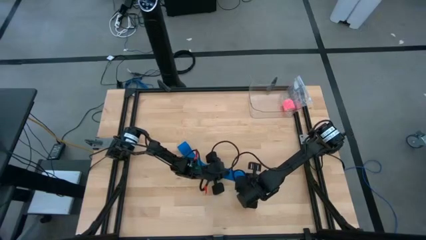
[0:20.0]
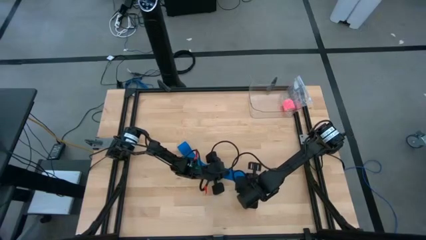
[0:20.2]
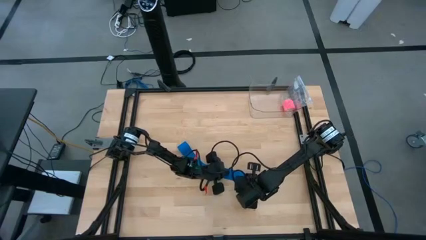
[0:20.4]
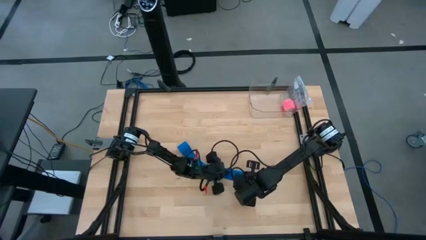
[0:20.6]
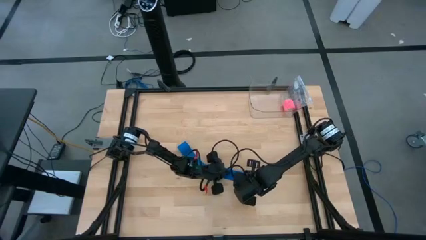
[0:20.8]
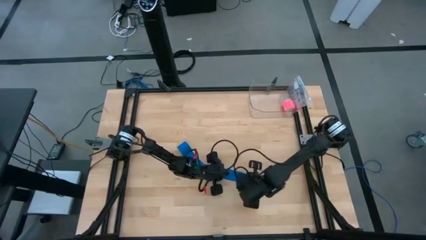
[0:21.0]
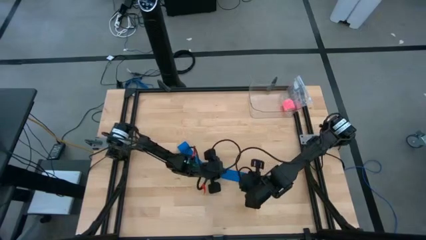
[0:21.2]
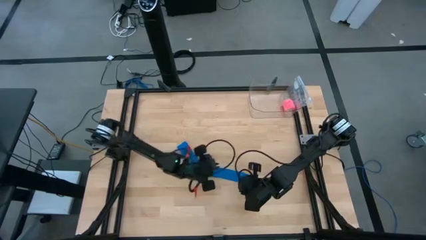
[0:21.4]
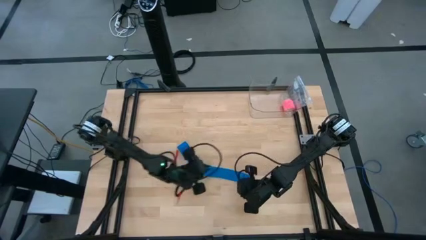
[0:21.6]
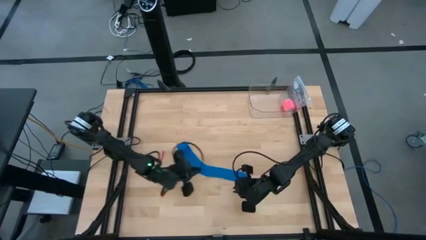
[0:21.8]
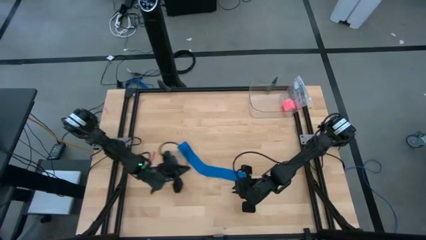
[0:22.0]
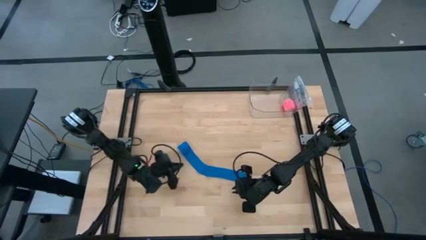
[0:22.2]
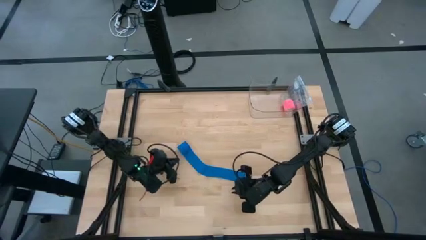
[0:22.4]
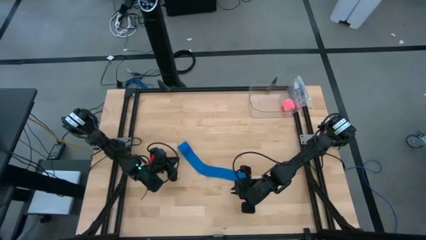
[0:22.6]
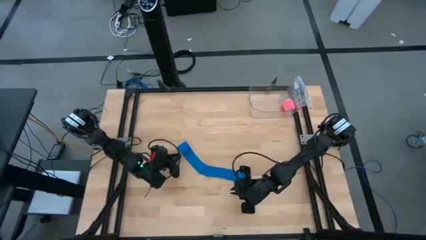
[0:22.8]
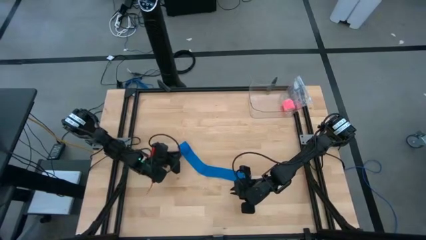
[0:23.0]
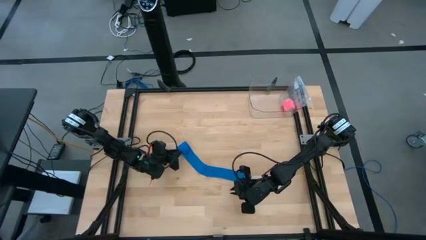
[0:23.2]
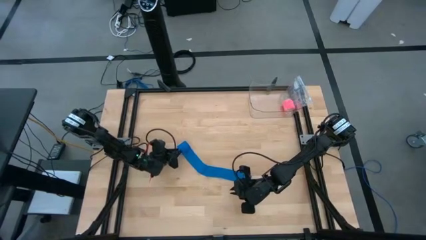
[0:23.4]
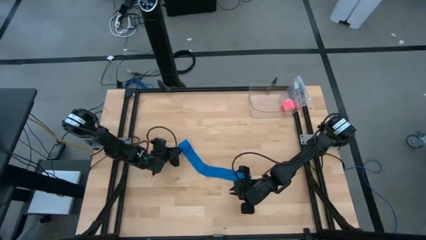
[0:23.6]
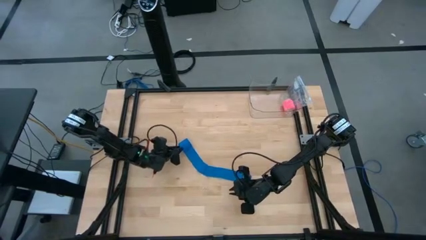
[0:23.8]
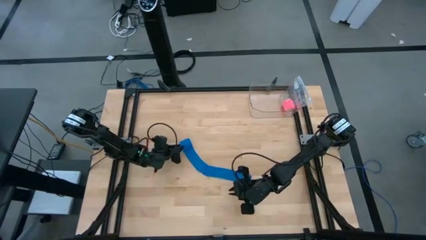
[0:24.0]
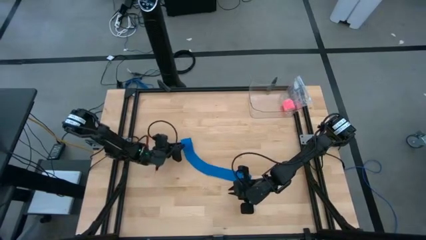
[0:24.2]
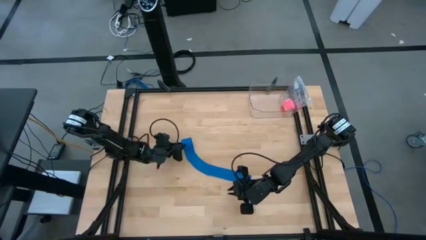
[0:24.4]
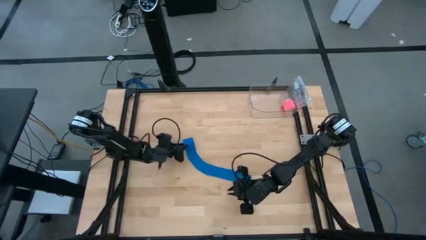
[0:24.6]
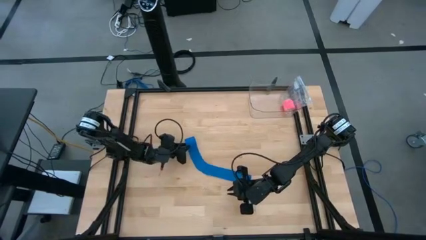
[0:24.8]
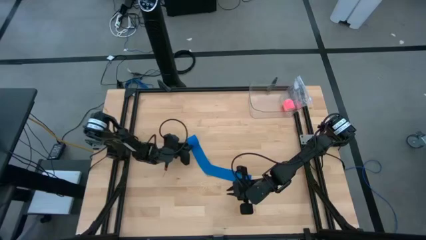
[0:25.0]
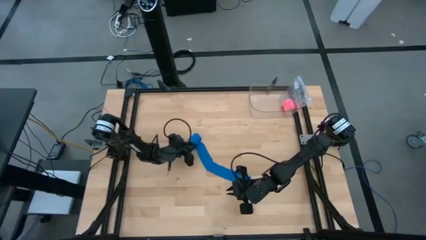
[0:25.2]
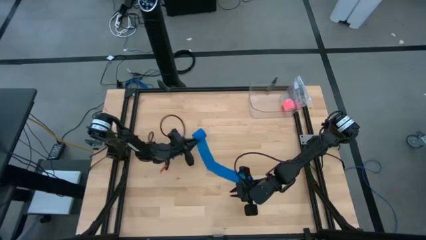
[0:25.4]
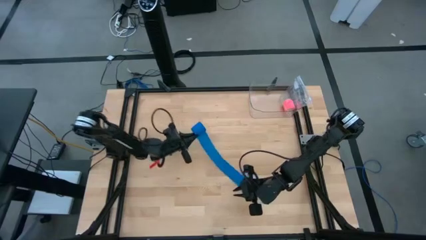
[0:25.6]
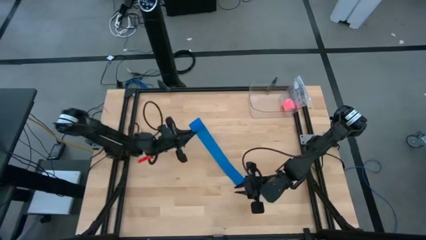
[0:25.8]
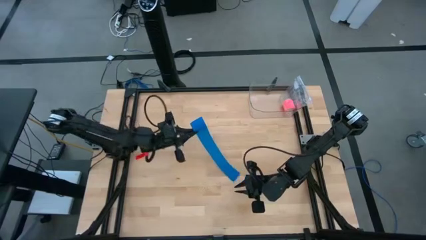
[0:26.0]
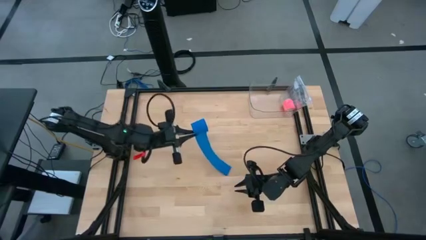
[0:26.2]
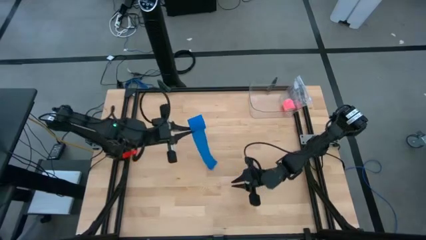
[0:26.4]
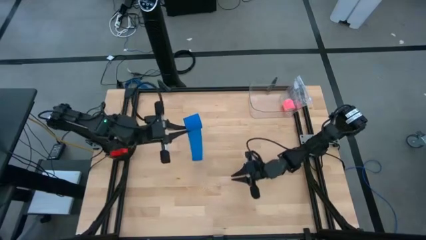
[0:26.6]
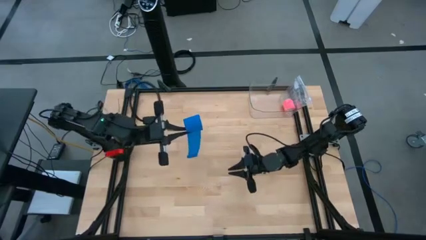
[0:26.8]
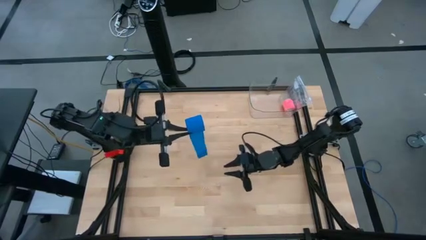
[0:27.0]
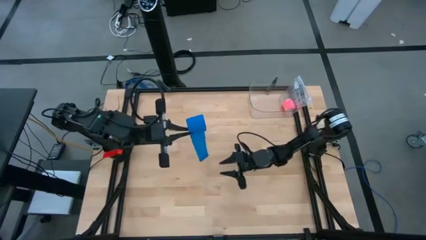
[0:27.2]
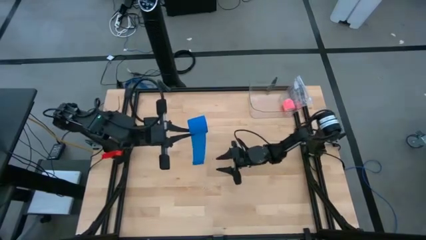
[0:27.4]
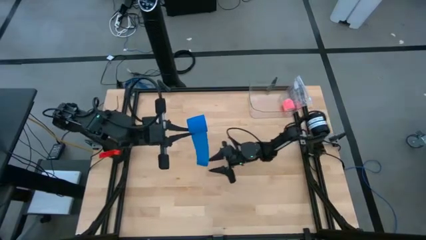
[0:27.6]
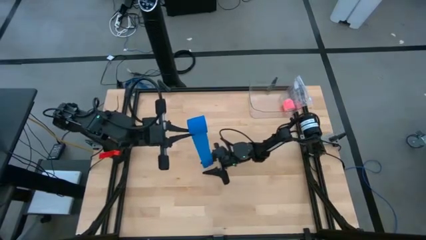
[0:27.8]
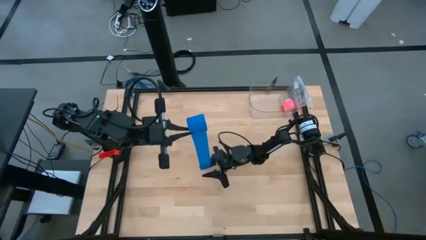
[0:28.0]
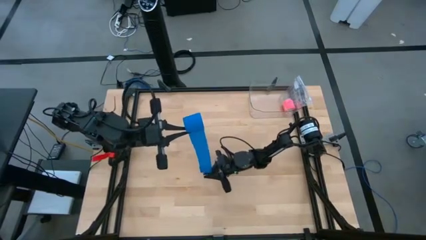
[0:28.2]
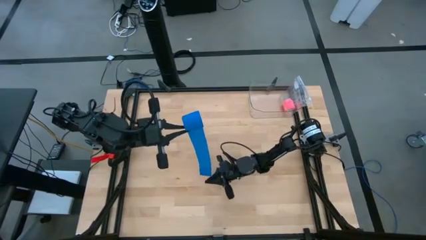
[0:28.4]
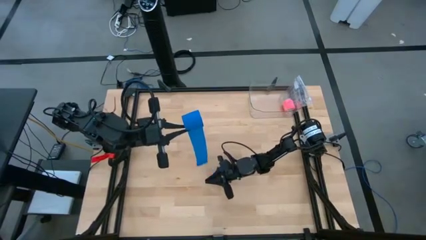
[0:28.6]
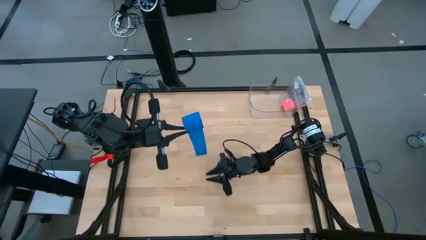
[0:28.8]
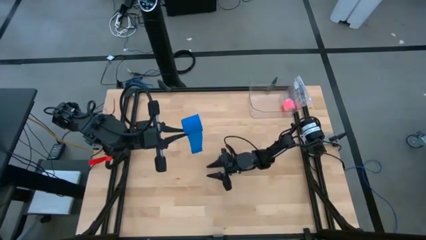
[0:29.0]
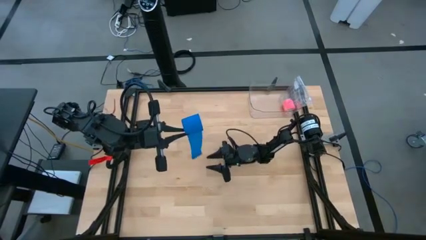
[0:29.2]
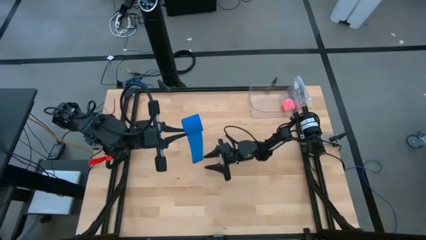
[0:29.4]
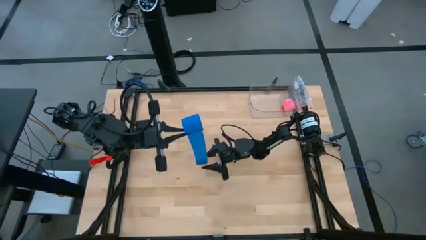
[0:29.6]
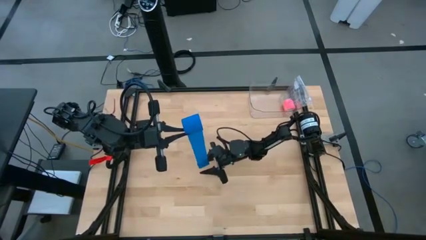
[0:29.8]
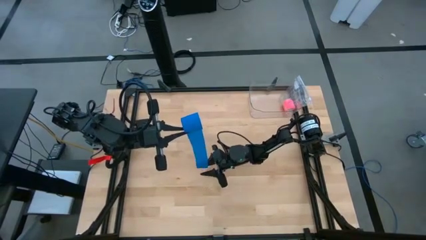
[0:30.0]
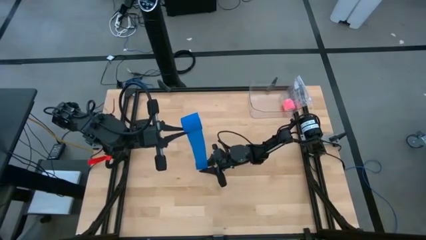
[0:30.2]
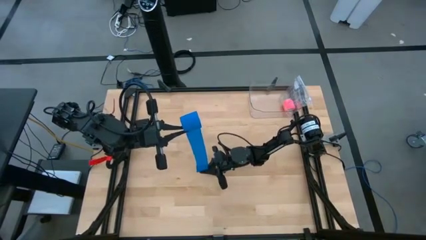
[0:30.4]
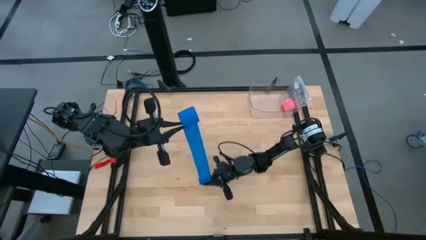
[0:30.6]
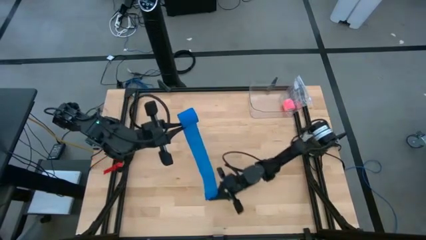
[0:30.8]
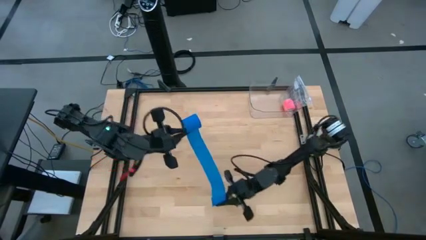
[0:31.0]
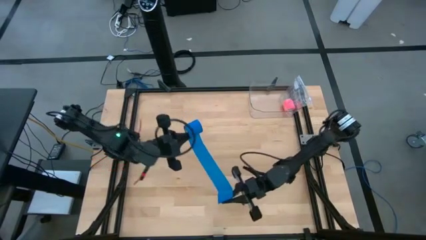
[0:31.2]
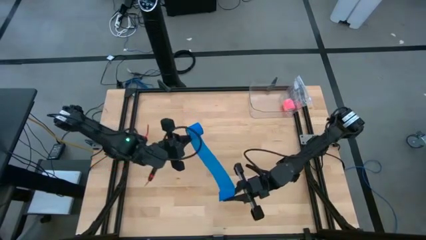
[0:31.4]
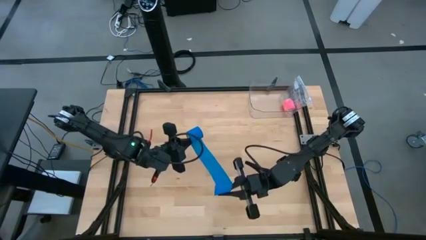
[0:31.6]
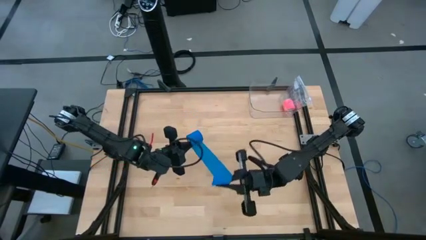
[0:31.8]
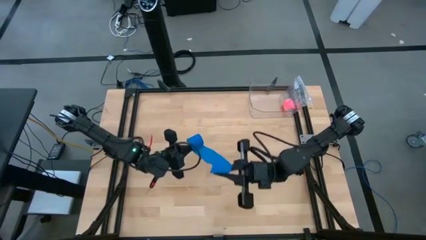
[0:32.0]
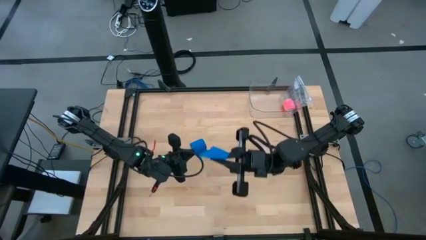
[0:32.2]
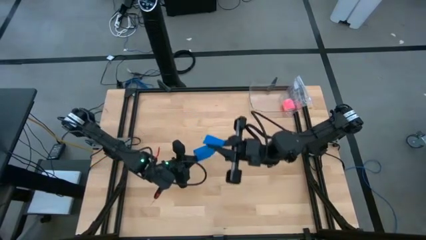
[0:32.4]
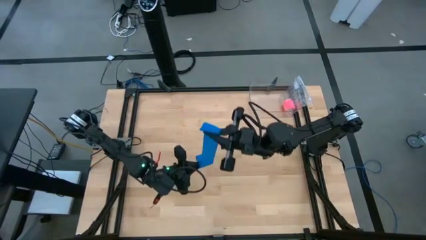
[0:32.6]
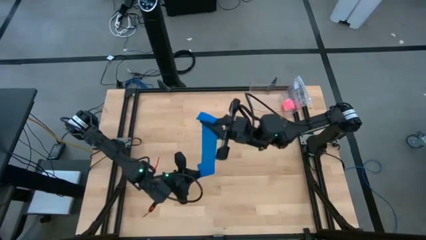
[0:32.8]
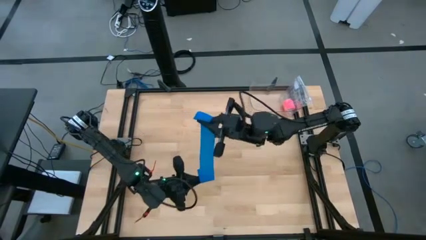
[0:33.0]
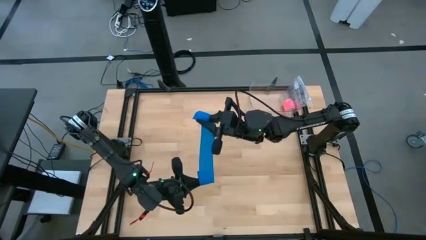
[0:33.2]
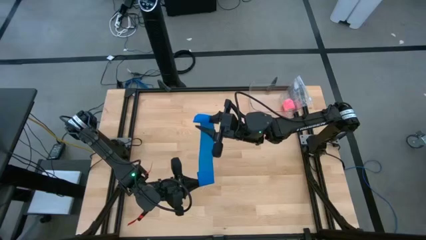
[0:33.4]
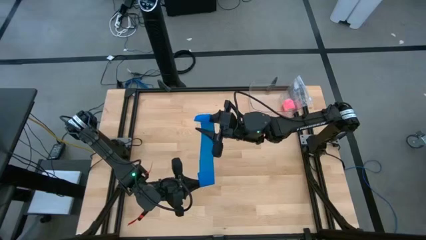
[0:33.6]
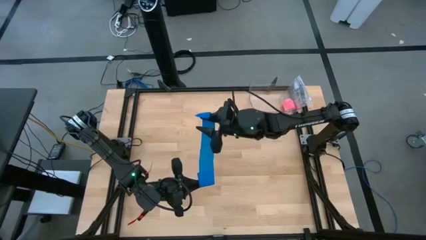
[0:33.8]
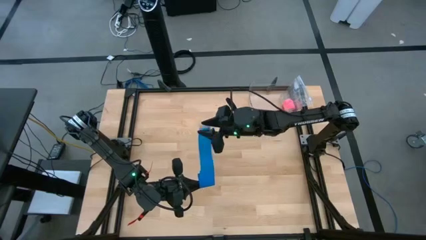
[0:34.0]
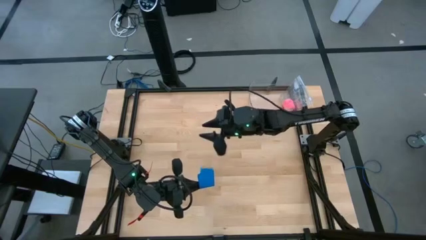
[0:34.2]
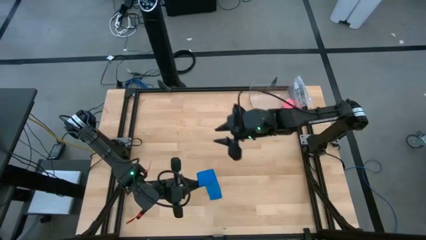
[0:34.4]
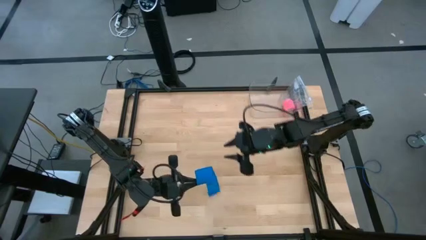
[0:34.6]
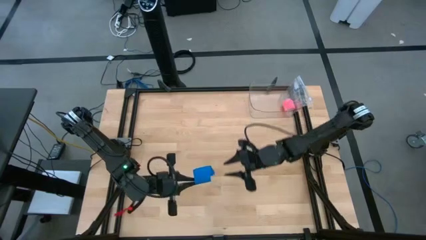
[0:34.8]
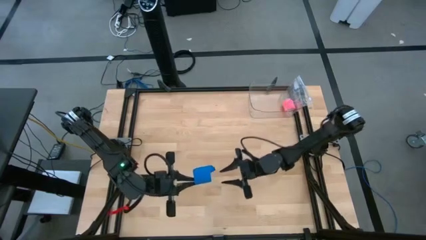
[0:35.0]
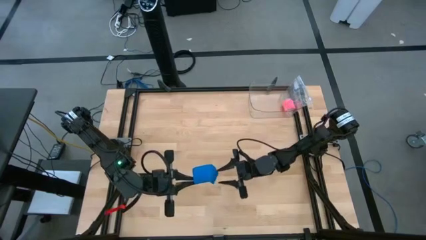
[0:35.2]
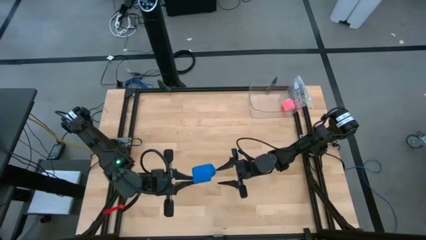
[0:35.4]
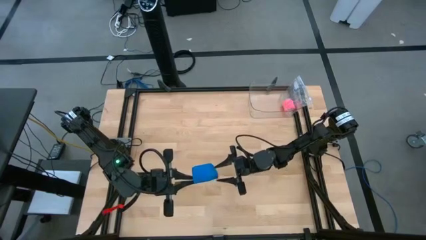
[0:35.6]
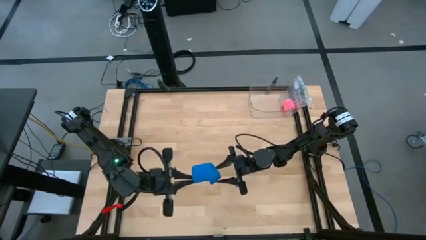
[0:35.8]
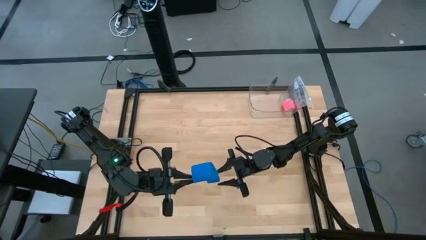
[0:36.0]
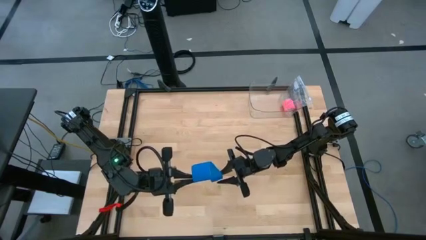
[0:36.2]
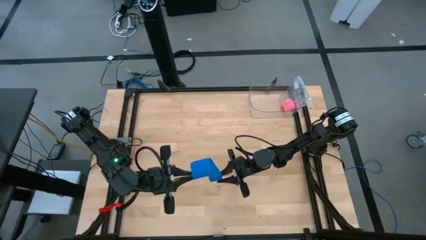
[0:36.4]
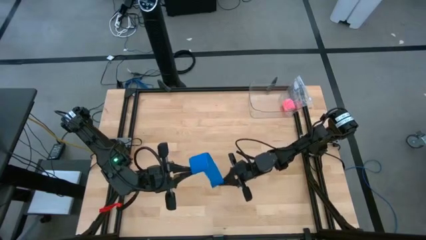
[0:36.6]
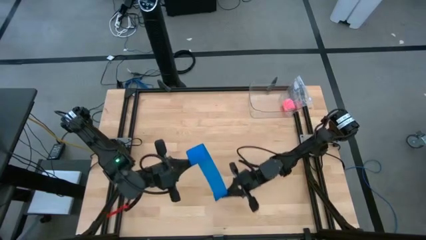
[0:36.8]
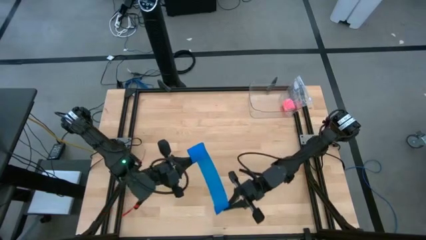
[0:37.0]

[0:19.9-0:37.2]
Task: Roll bandage
Roll the blue bandage
